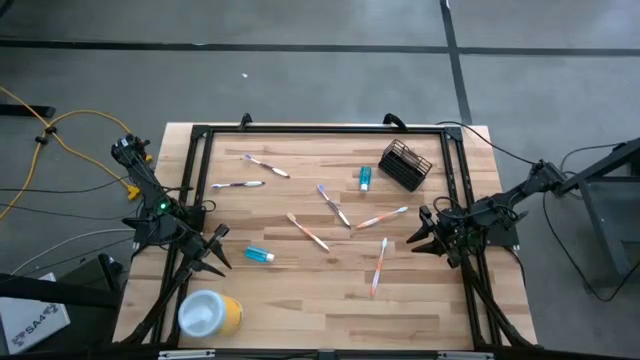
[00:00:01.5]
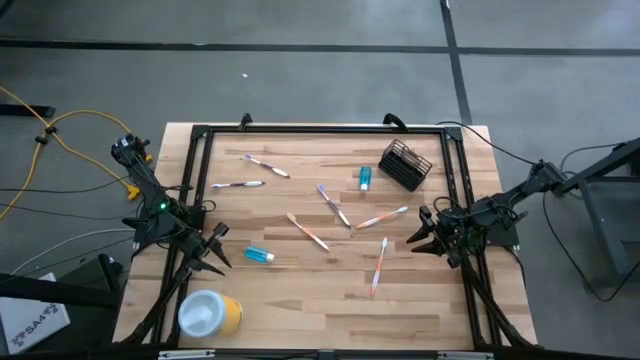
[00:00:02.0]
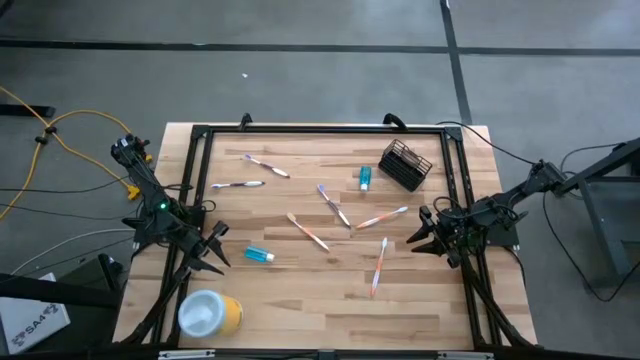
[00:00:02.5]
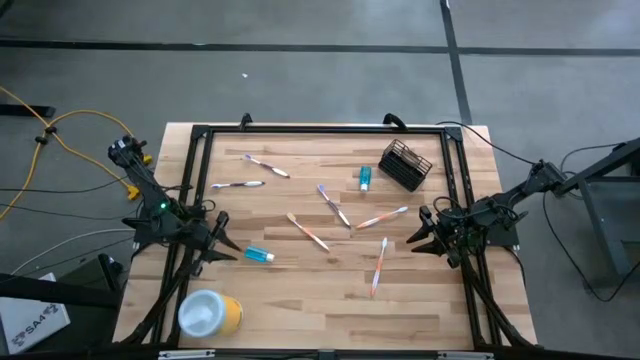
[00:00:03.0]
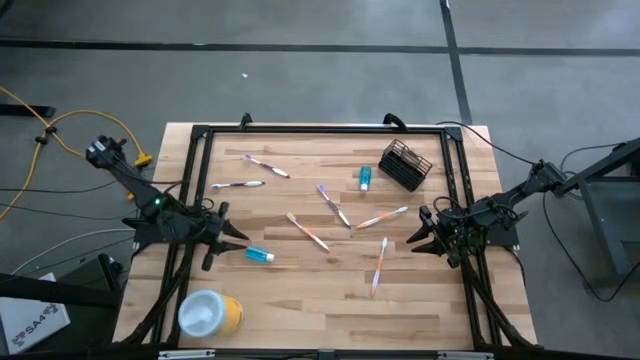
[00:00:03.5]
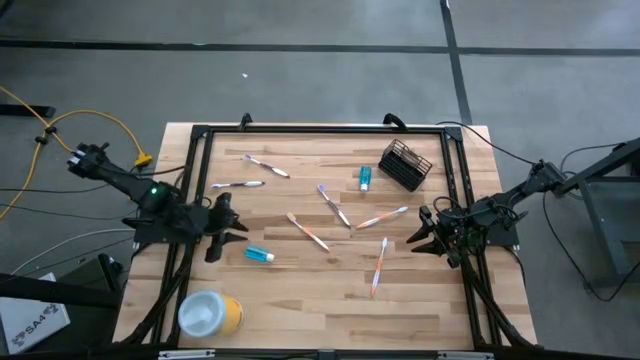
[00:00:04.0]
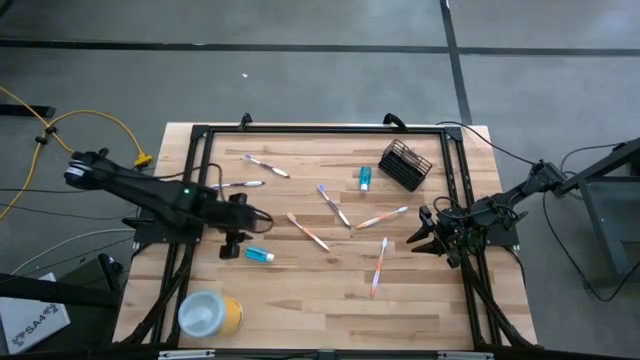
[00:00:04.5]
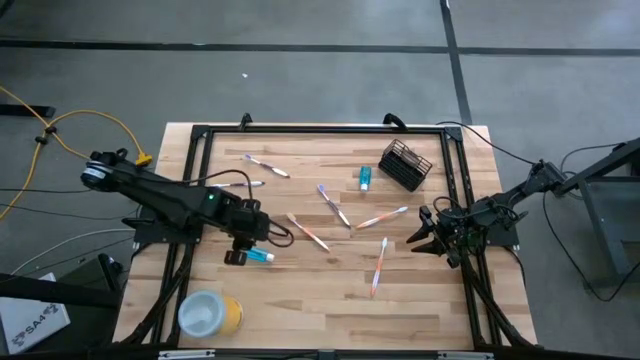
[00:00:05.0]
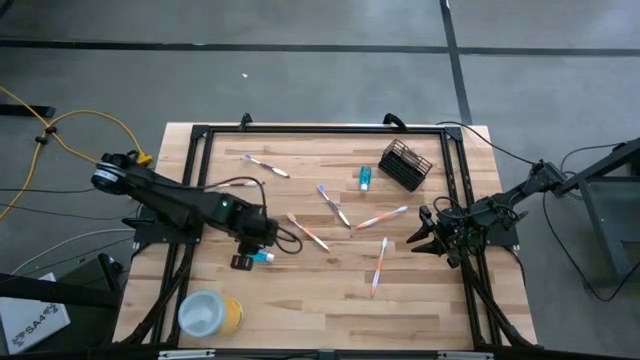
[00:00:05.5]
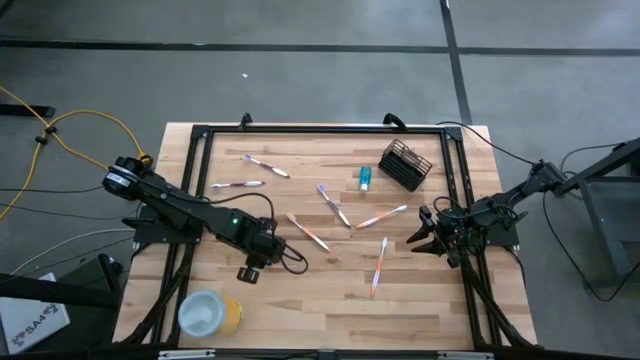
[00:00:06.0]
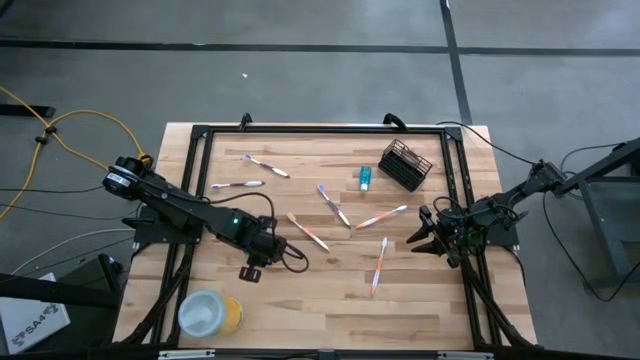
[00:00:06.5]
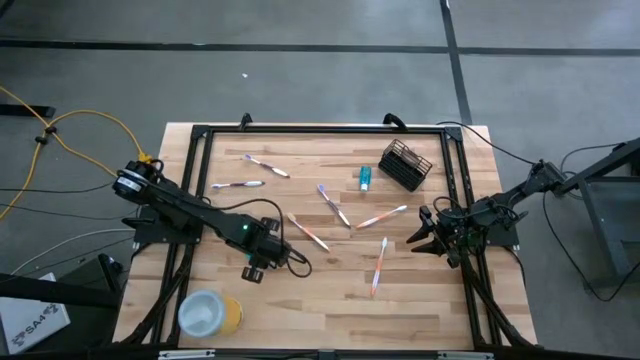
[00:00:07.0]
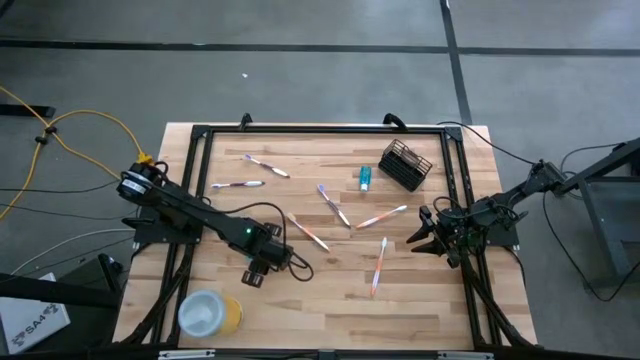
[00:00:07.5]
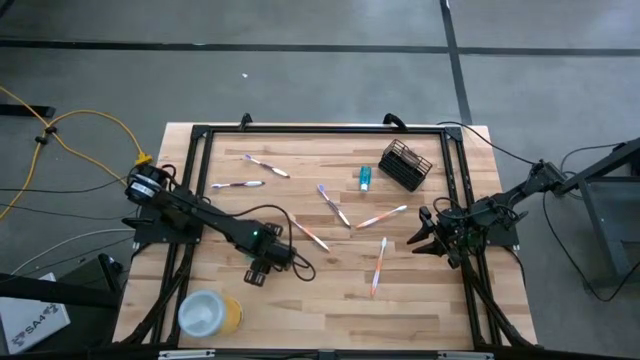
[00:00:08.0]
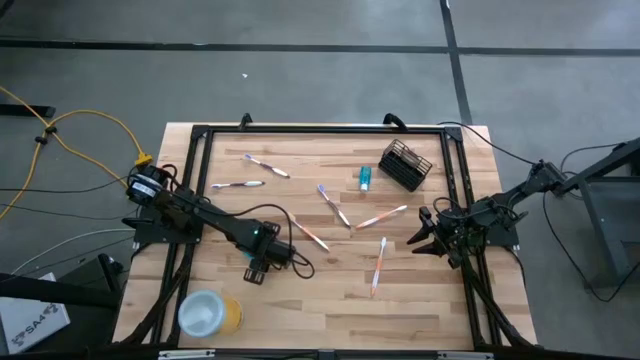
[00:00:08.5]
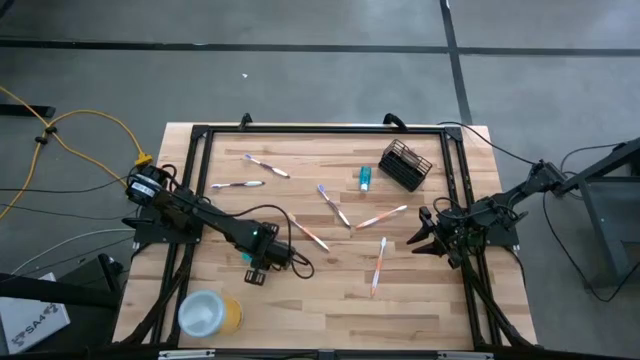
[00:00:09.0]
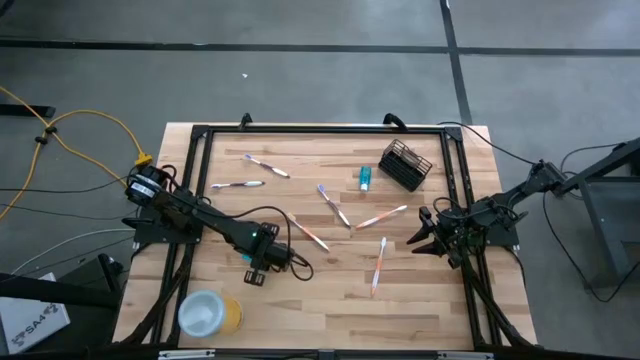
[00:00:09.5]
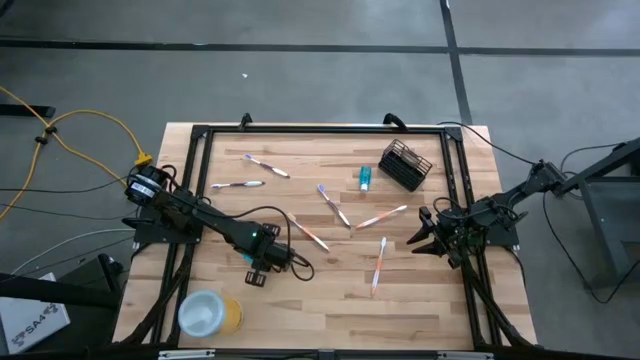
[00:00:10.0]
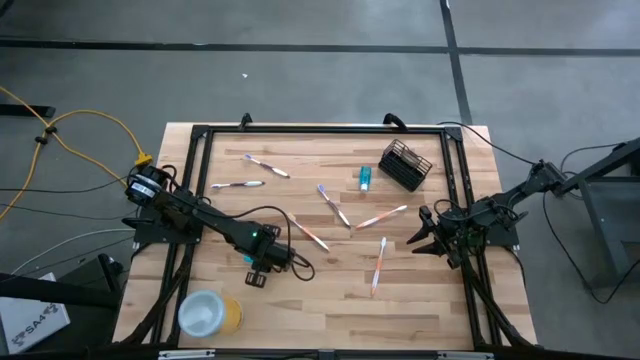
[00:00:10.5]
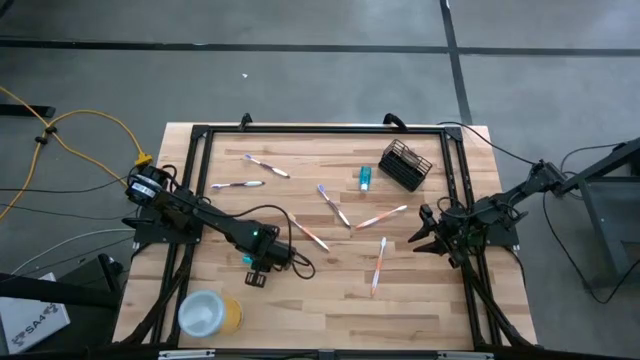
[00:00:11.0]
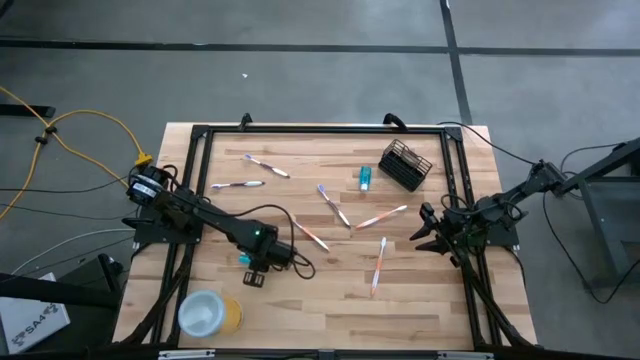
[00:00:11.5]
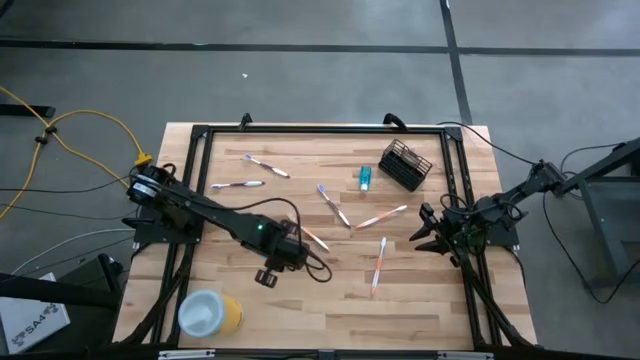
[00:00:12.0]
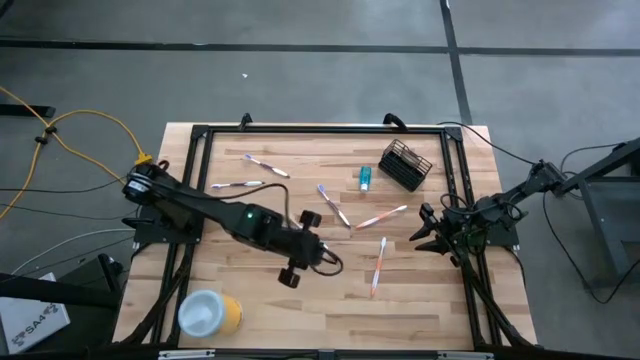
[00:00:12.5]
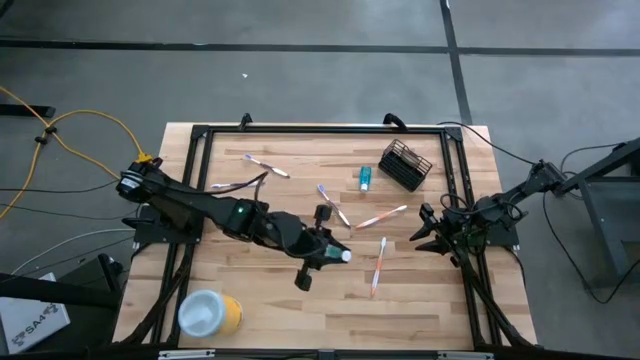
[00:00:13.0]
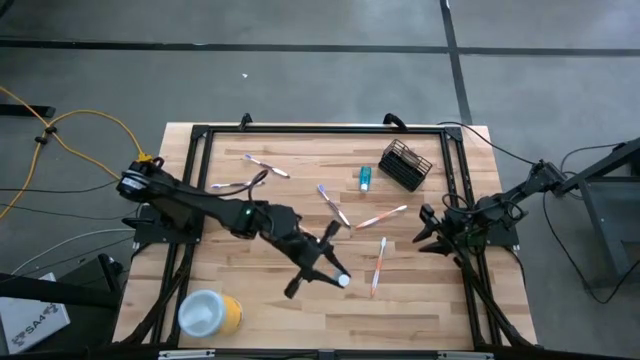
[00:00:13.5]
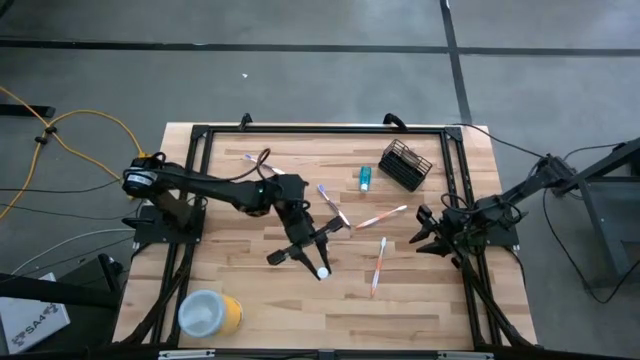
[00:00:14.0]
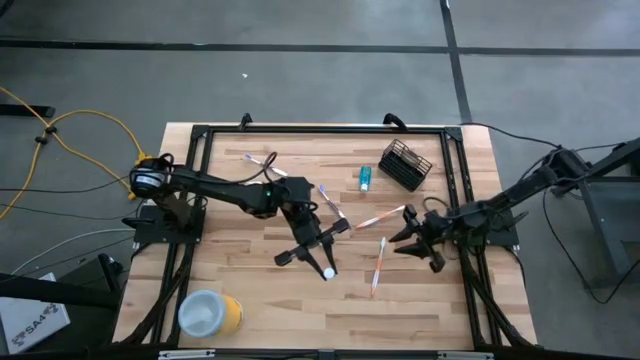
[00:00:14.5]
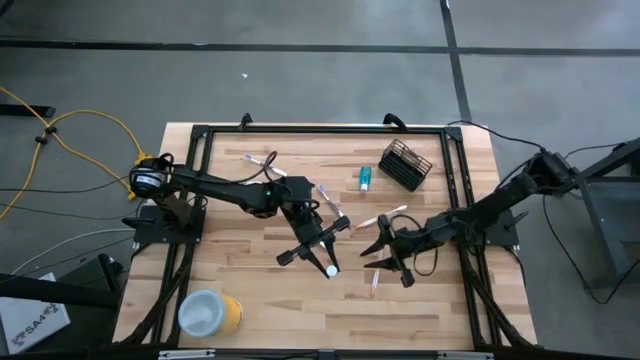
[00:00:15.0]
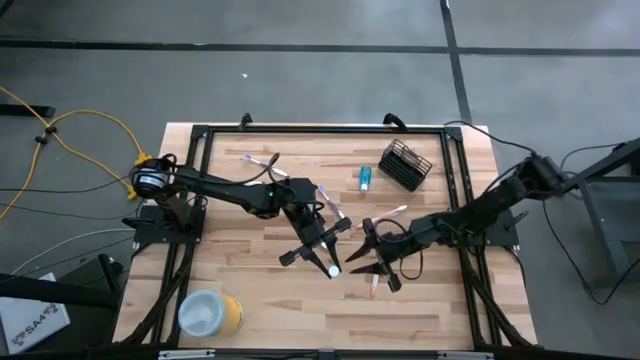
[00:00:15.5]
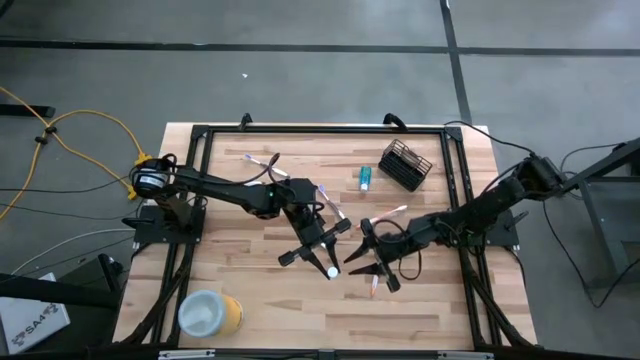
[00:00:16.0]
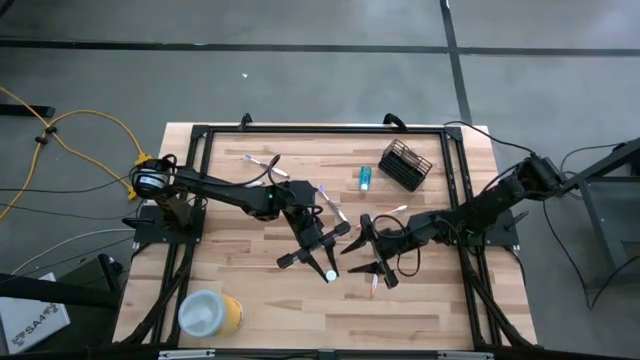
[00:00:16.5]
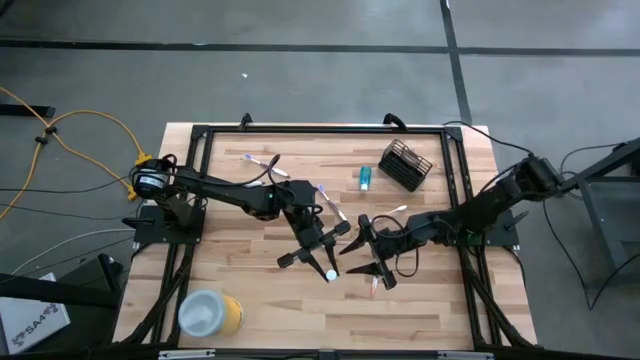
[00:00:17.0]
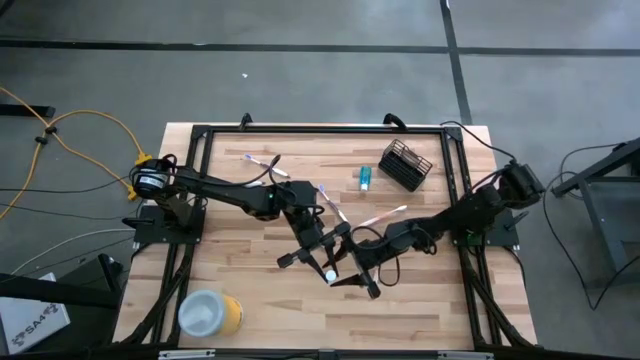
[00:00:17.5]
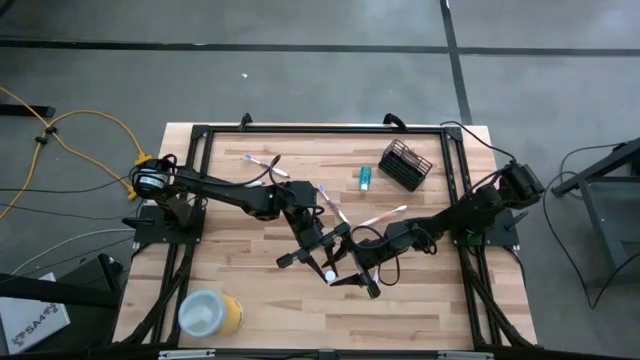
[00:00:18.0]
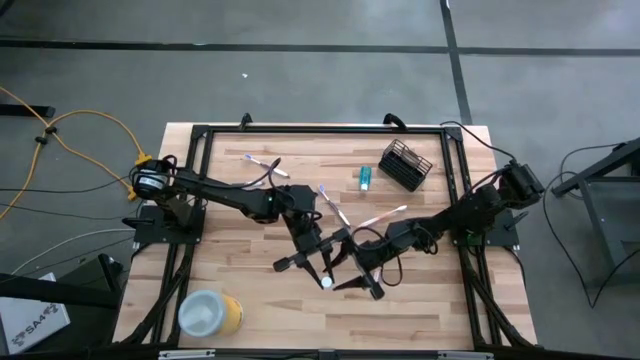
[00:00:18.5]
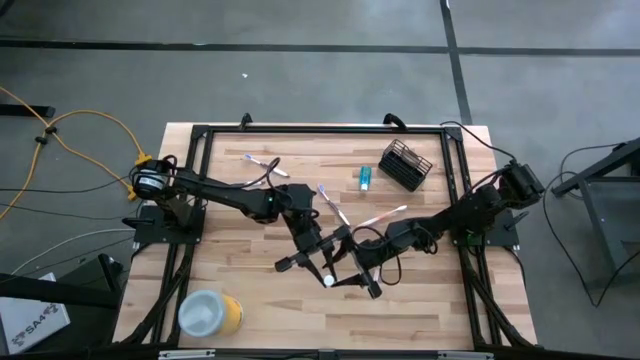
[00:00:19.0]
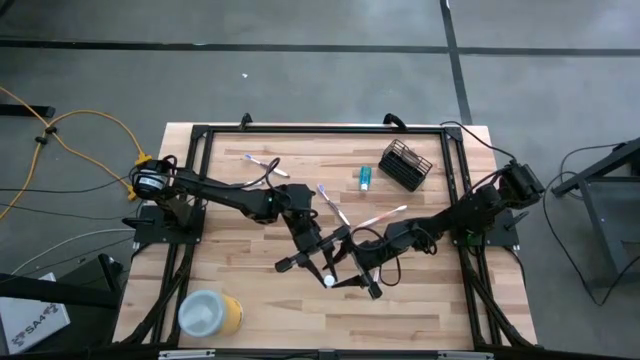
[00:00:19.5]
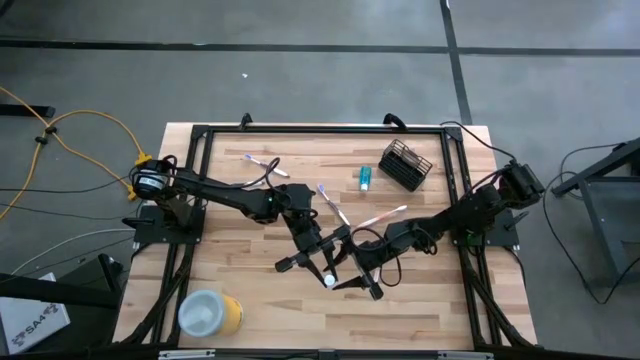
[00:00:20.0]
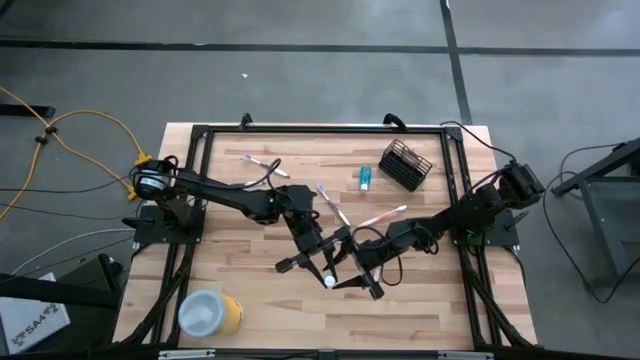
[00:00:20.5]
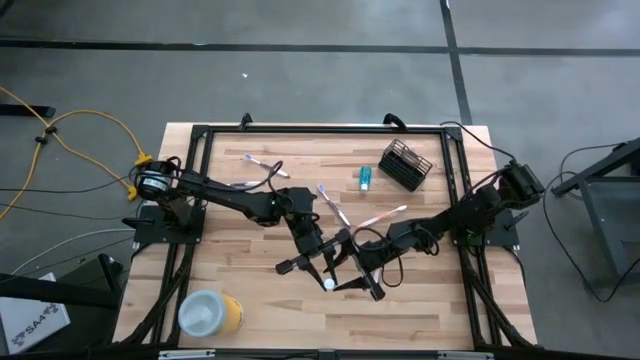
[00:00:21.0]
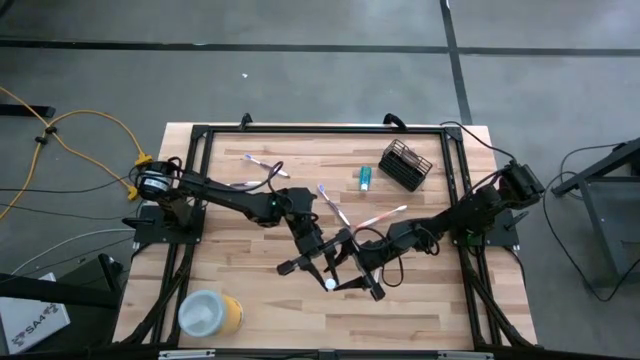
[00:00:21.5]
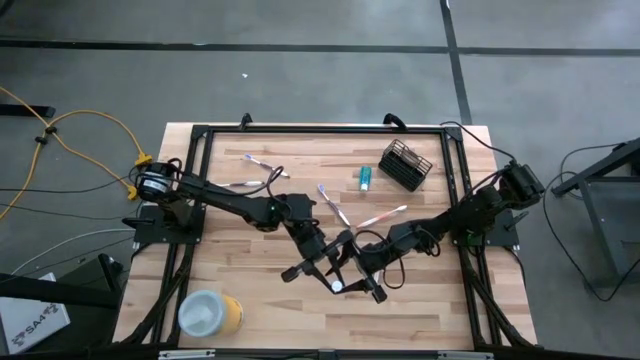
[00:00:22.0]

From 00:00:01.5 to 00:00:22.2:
Task: Pick & Place toothbrushing station
Put the bottom blue mouthwash bottle into the middle of the black mesh organizer
